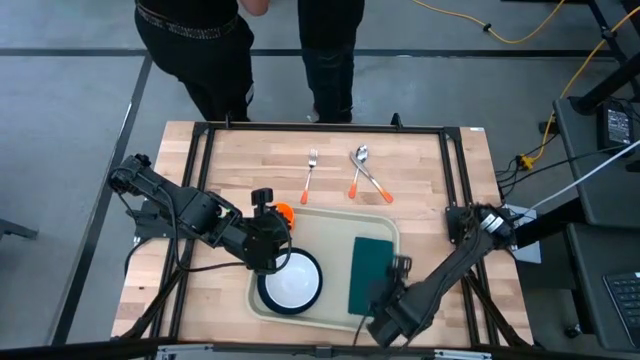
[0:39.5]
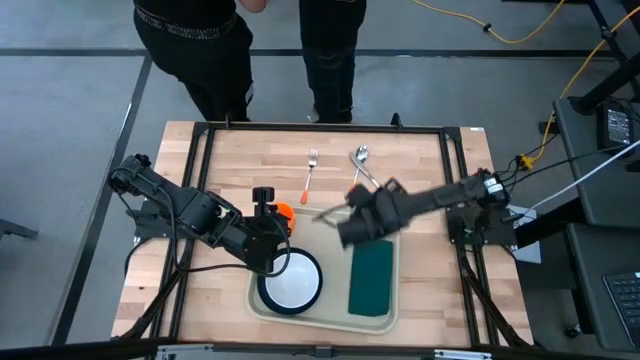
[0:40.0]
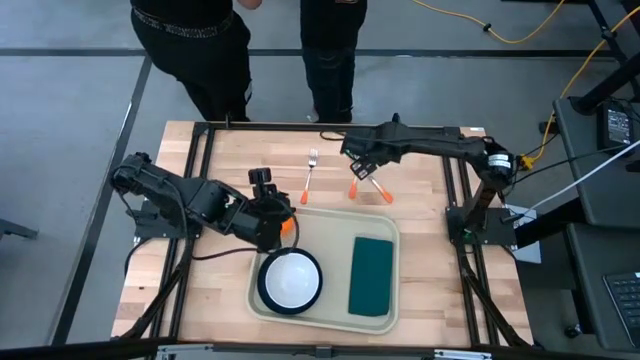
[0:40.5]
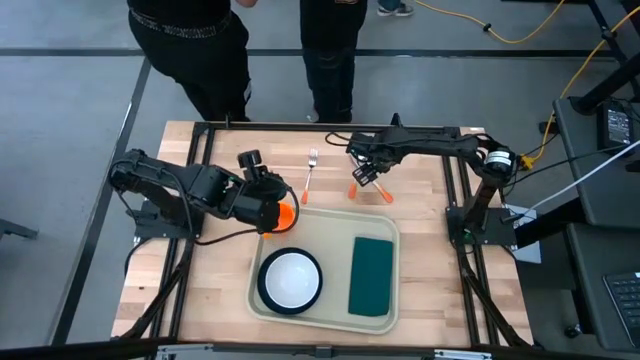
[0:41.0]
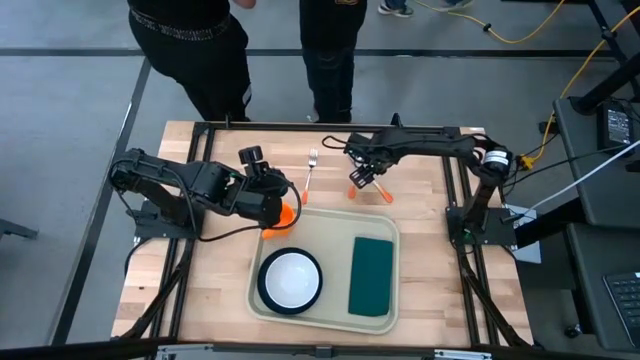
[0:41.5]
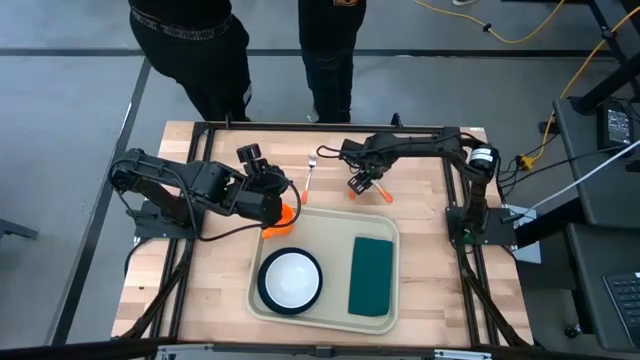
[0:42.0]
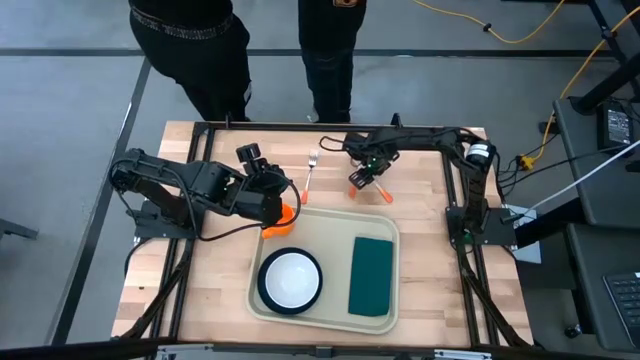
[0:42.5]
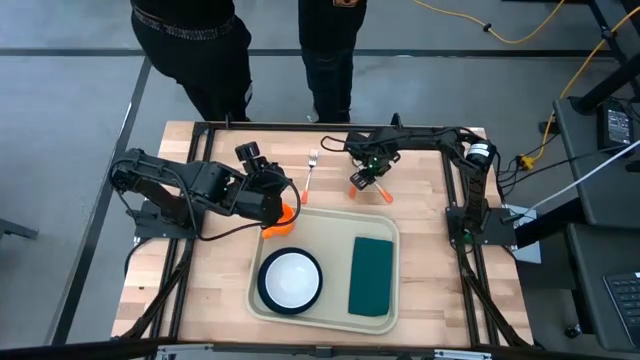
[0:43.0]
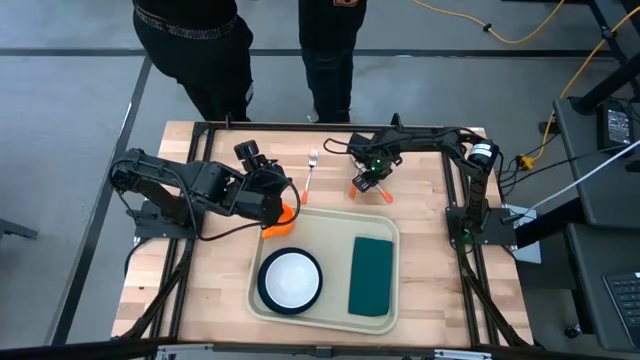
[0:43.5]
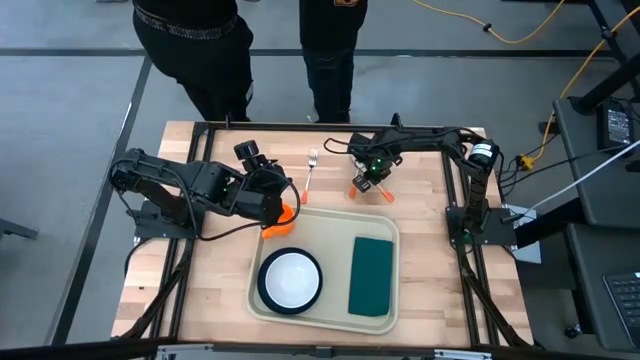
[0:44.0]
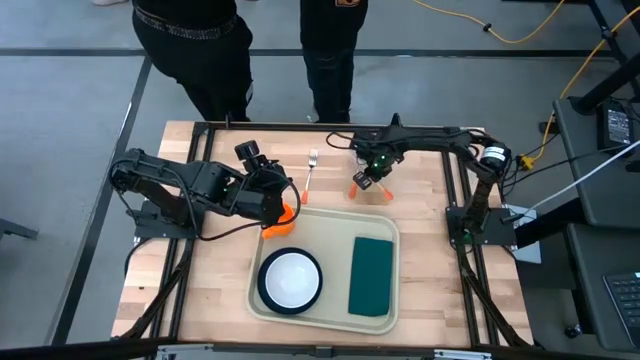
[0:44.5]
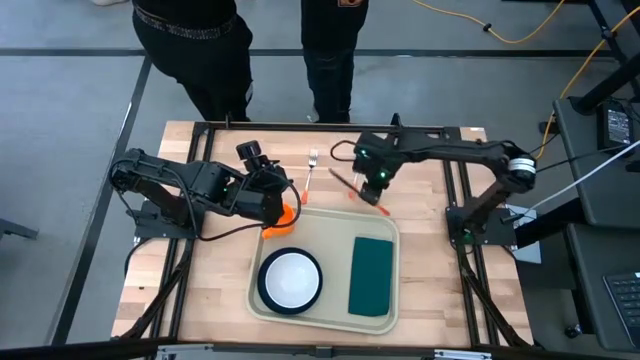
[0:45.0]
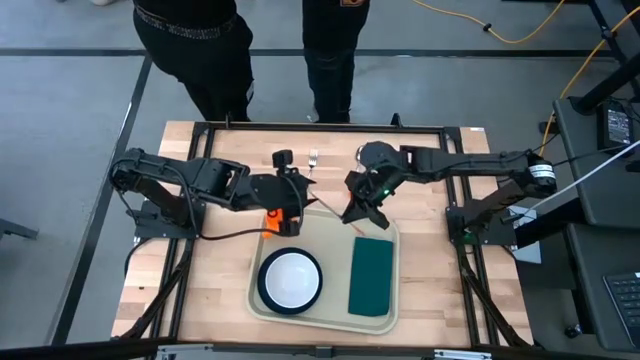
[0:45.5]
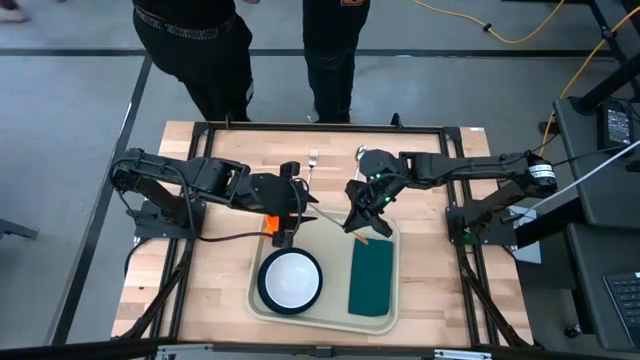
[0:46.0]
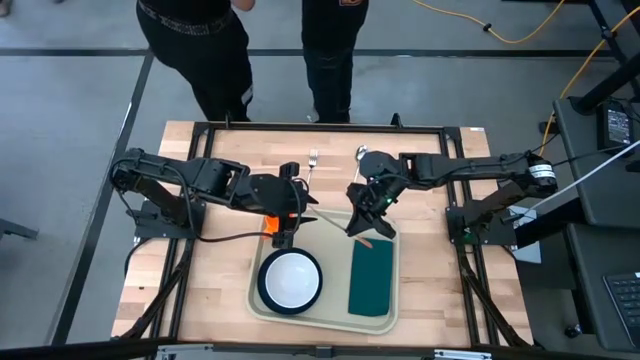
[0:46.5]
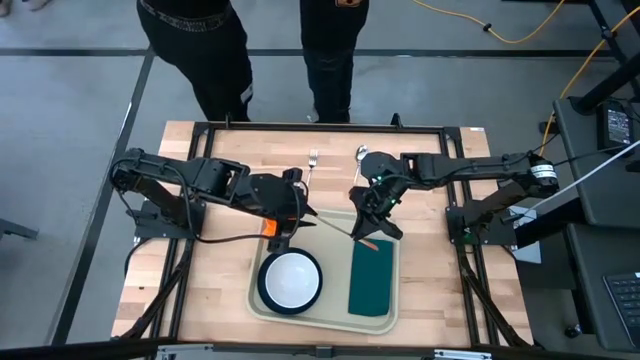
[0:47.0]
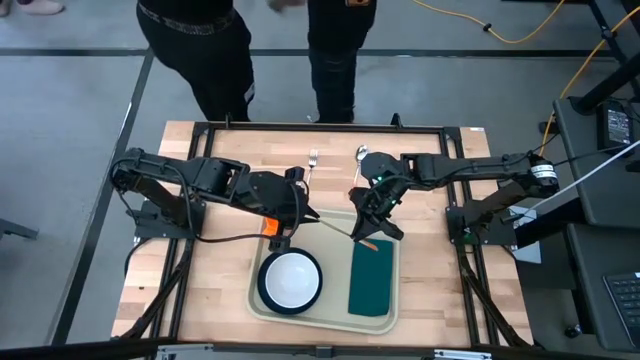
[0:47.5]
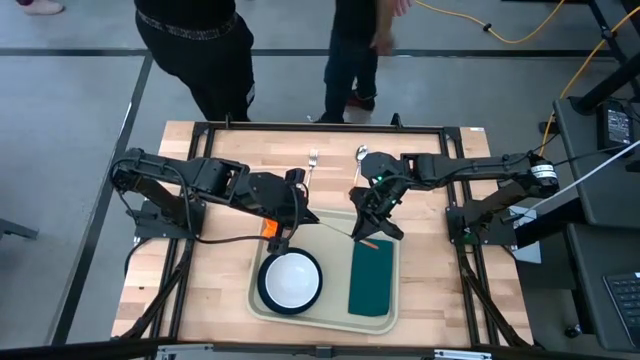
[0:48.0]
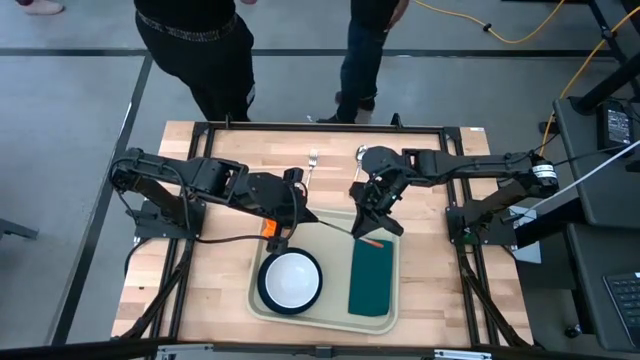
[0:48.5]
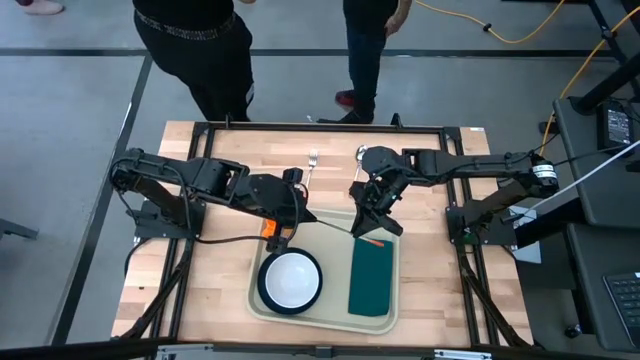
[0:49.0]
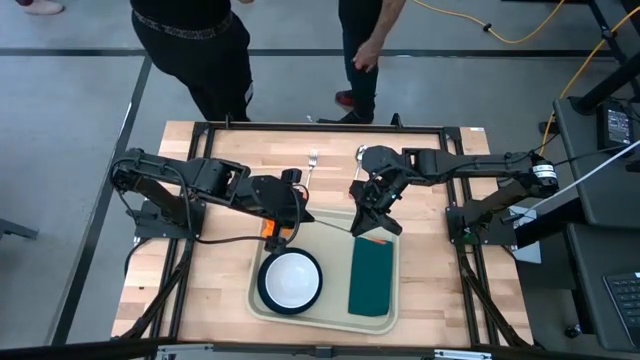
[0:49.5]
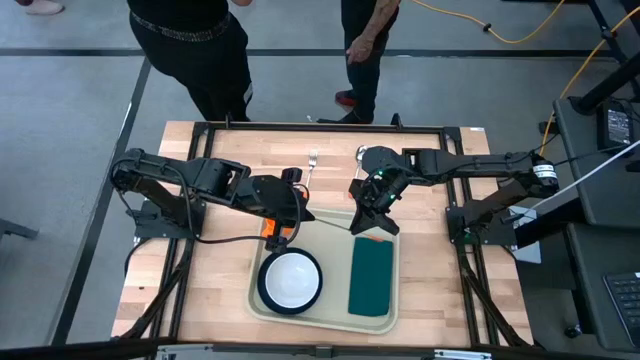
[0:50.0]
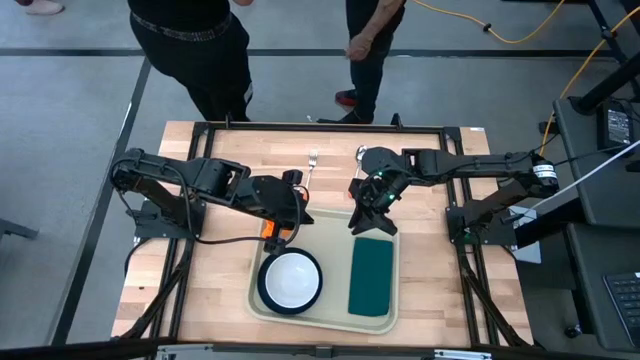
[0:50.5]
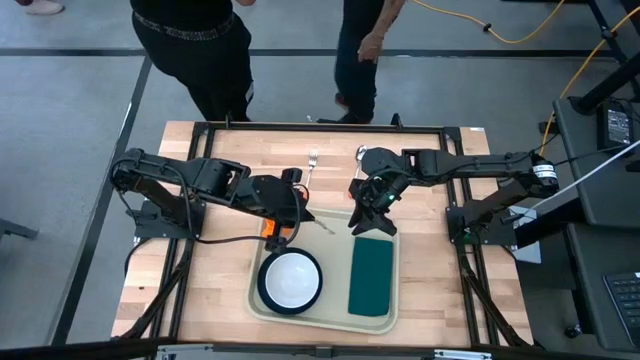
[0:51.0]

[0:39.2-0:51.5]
Task: Set up tray
Put the orange knife on the napkin

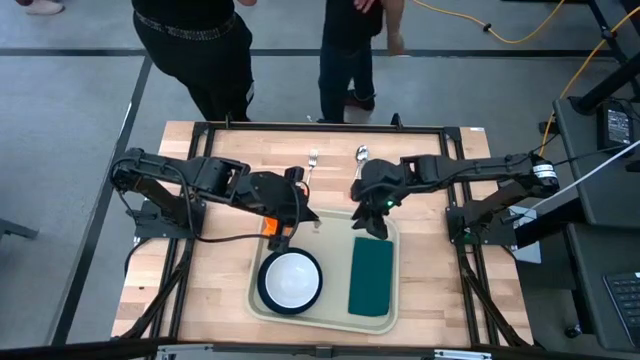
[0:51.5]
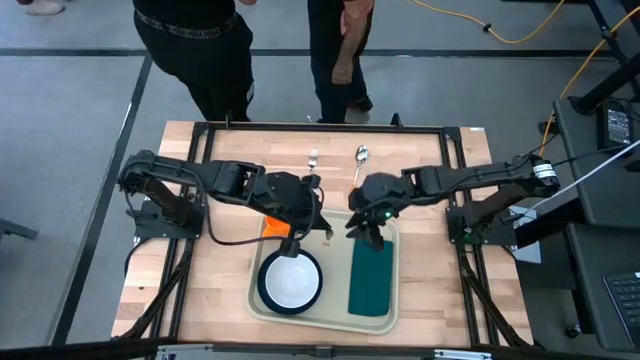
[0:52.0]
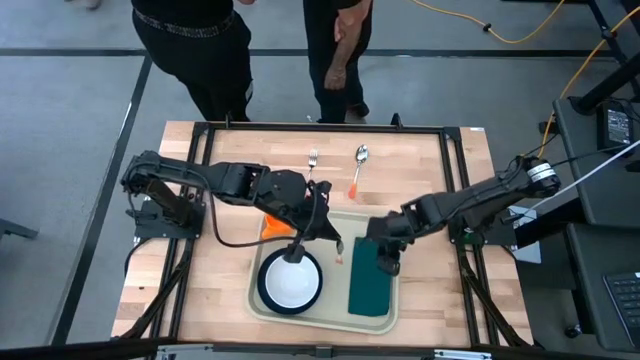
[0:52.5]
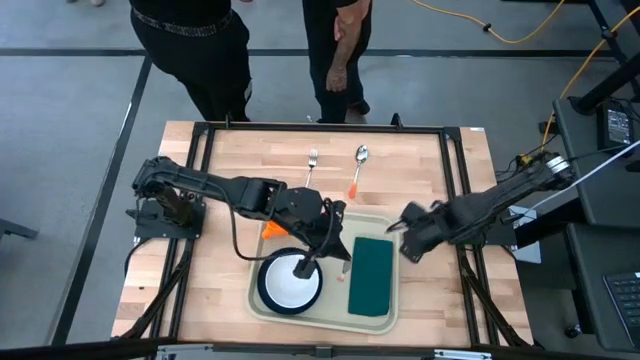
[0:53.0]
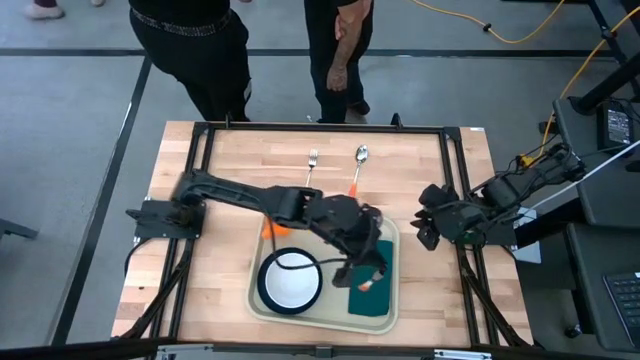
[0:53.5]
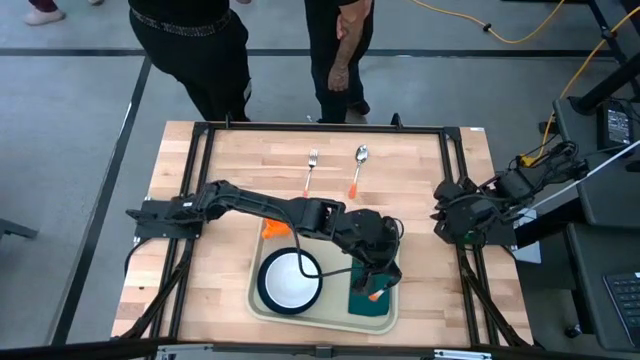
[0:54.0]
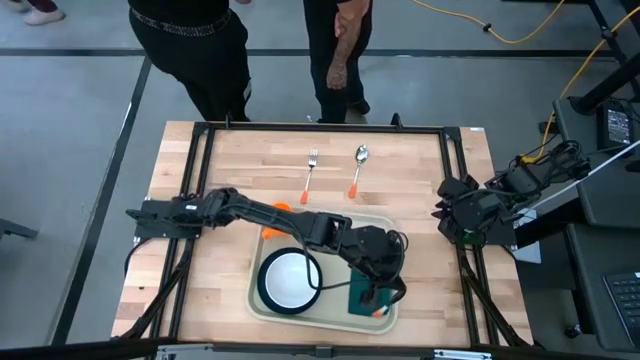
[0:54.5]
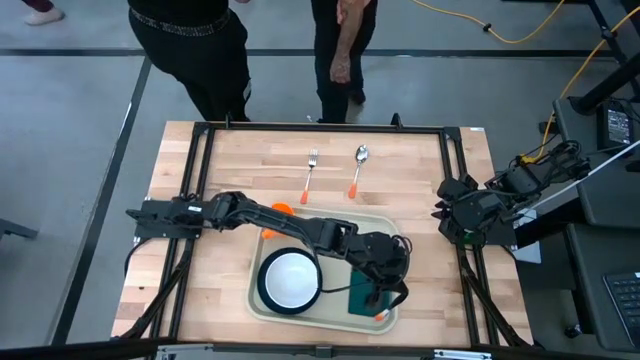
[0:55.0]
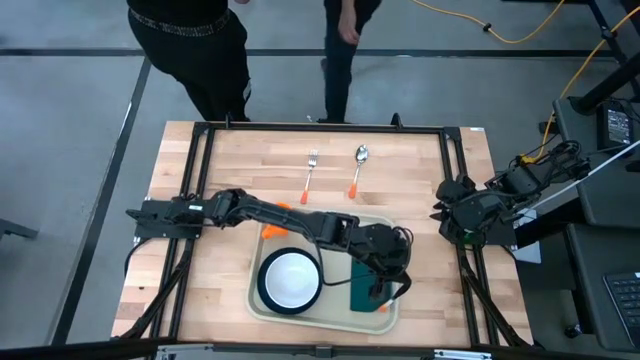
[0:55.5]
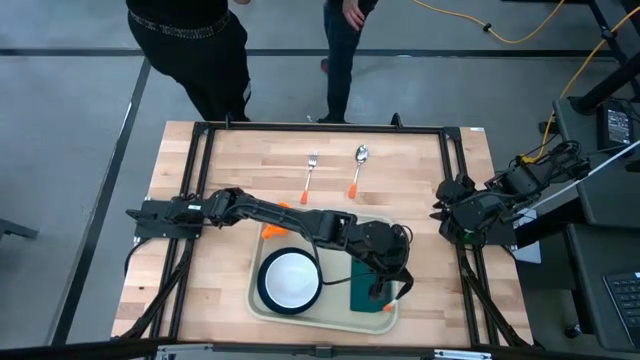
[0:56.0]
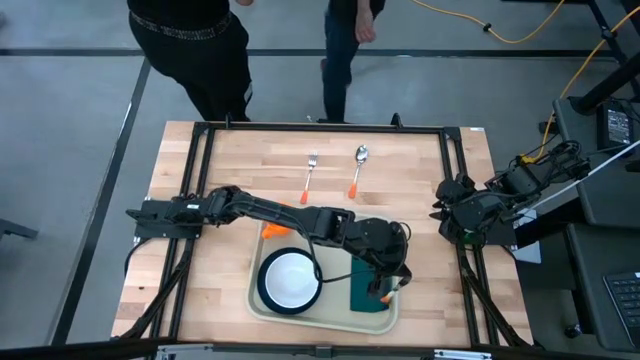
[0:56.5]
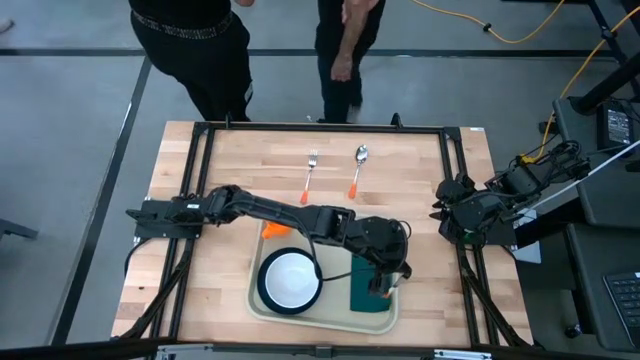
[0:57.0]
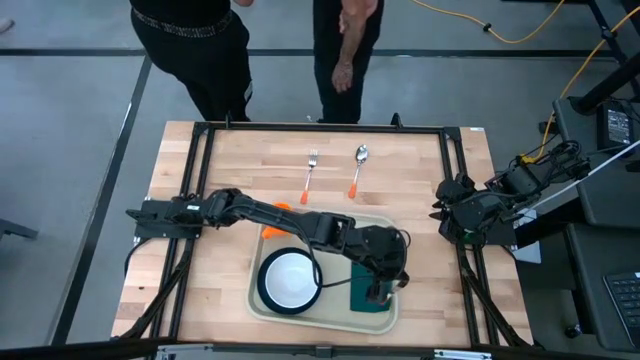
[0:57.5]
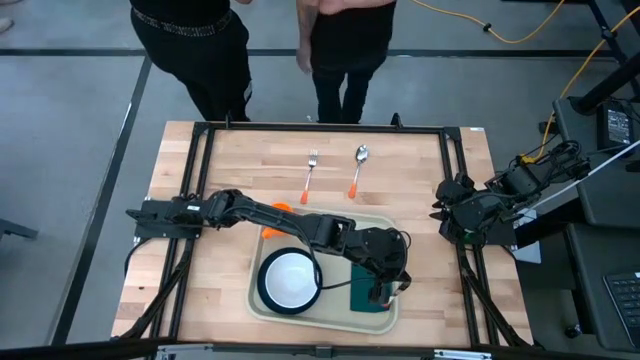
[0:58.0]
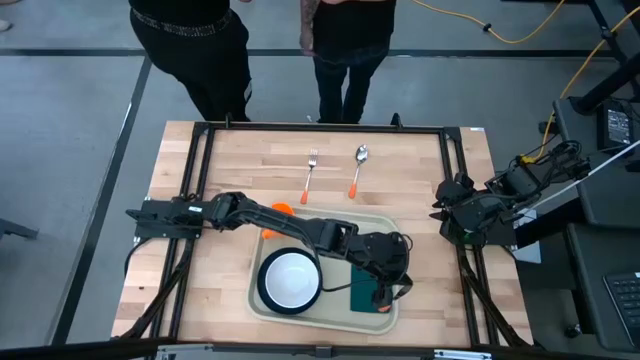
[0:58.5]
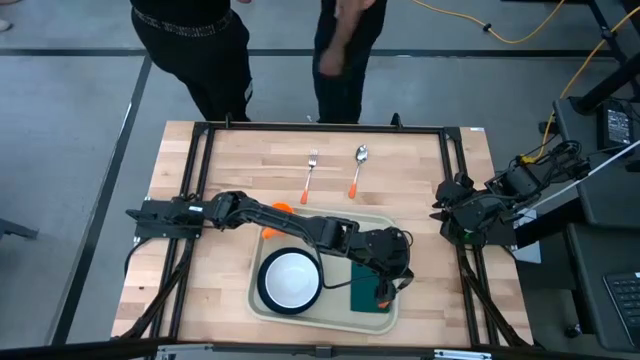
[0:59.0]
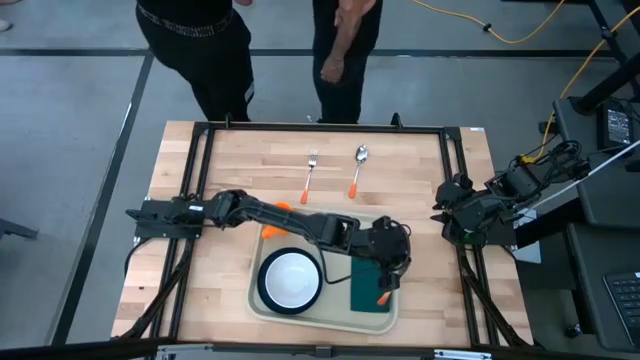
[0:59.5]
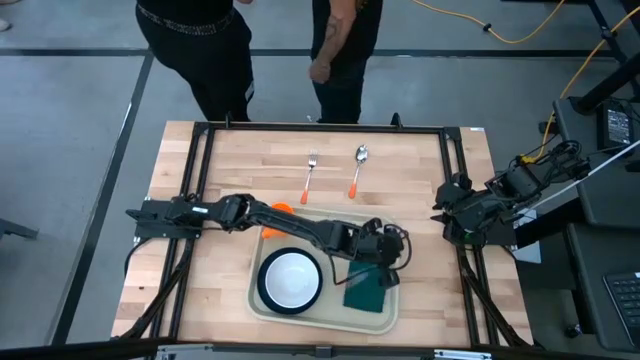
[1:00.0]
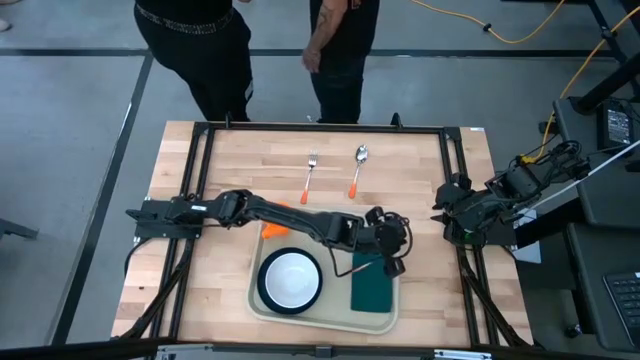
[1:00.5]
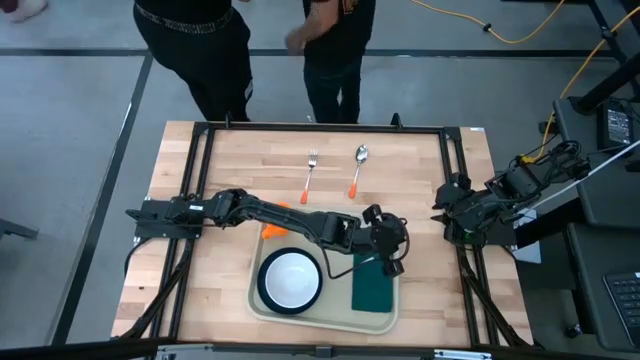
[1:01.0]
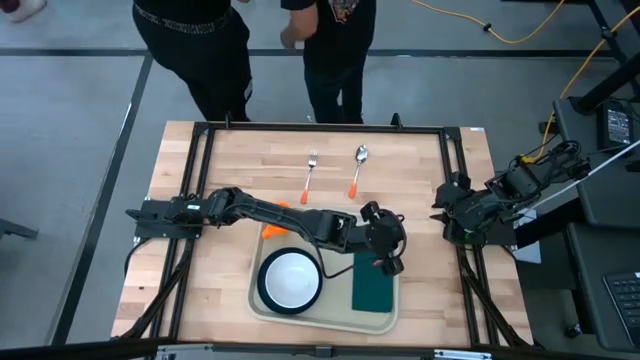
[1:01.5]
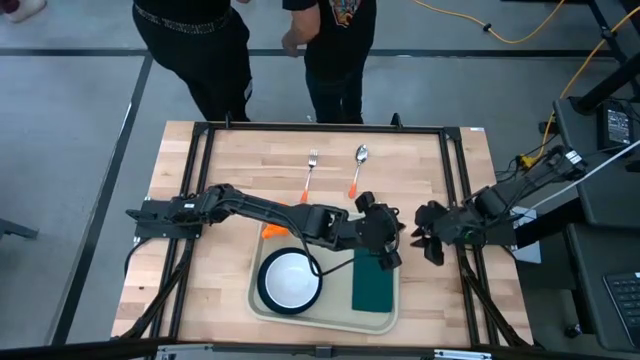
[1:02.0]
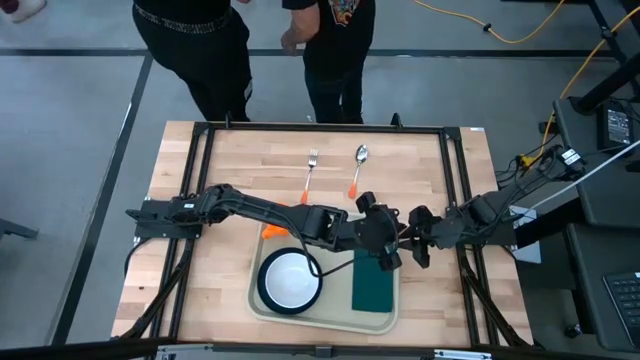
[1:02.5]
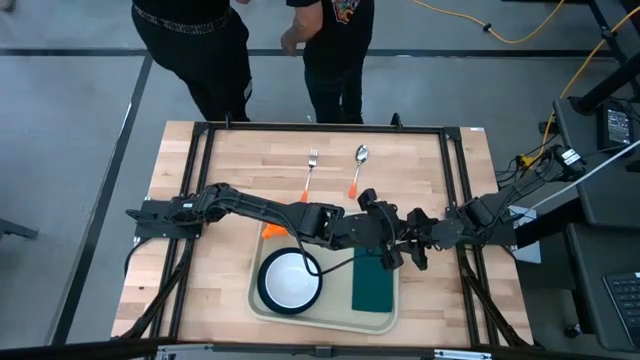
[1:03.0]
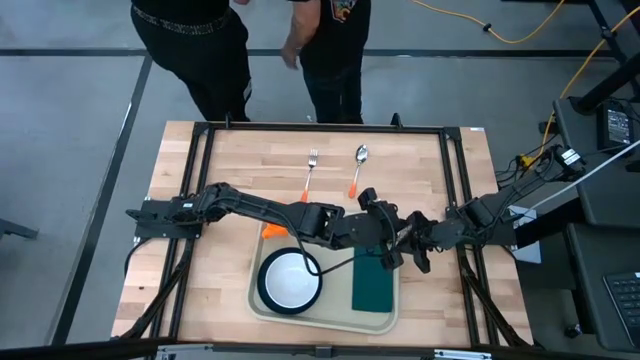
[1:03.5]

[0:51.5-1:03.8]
Put the orange knife on the napkin
